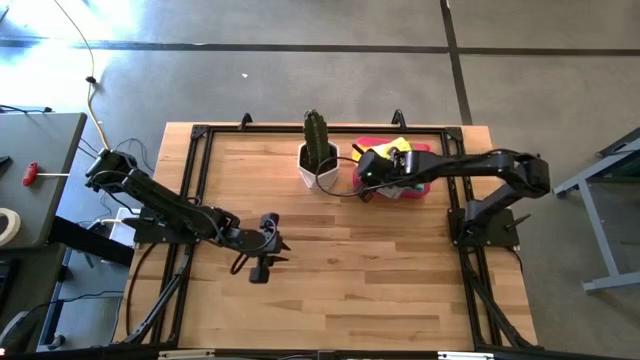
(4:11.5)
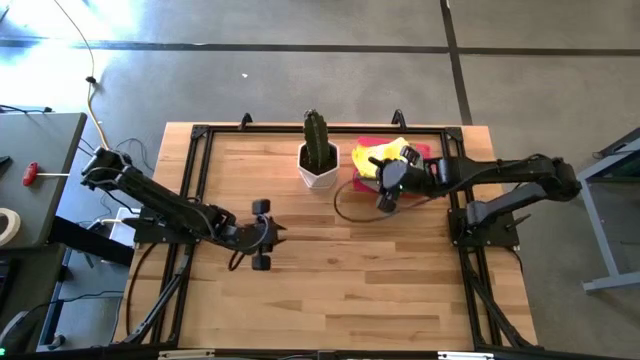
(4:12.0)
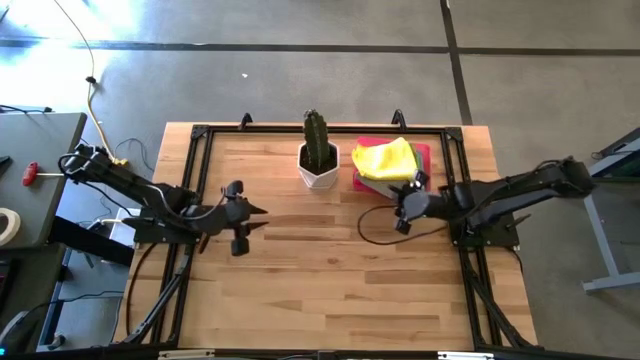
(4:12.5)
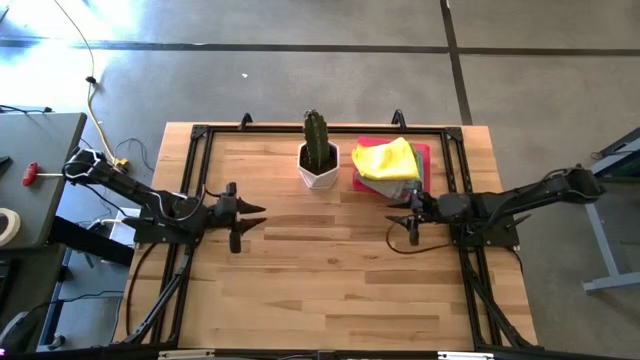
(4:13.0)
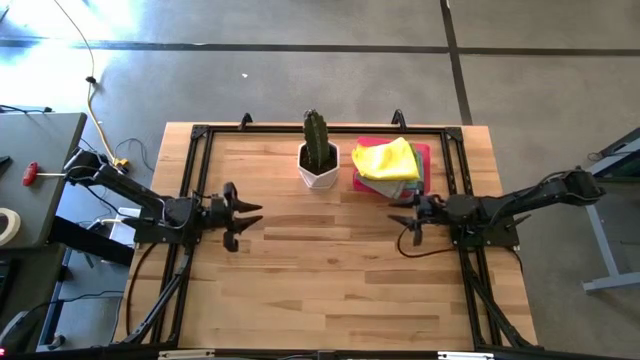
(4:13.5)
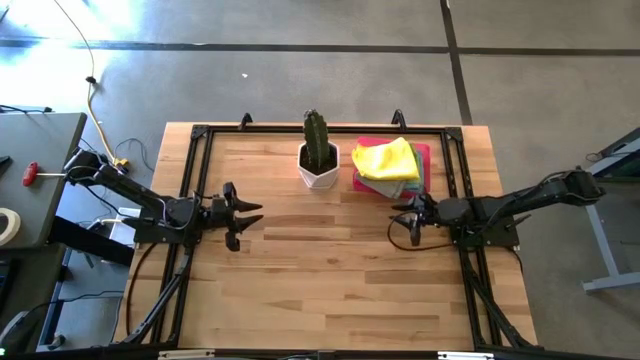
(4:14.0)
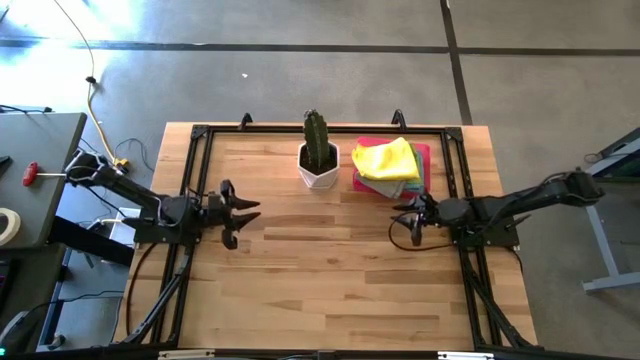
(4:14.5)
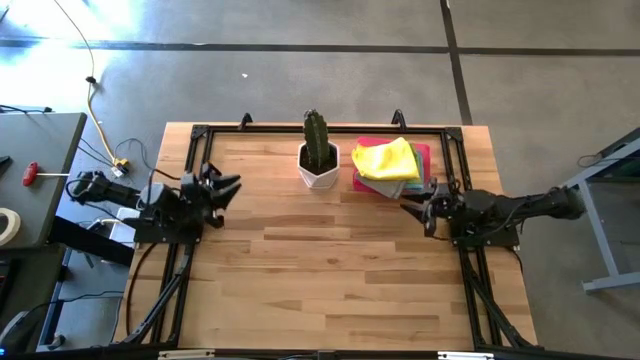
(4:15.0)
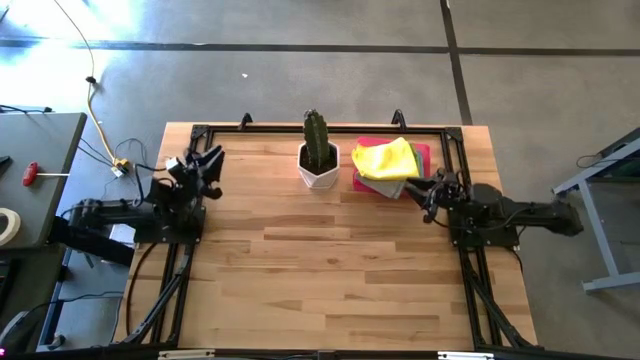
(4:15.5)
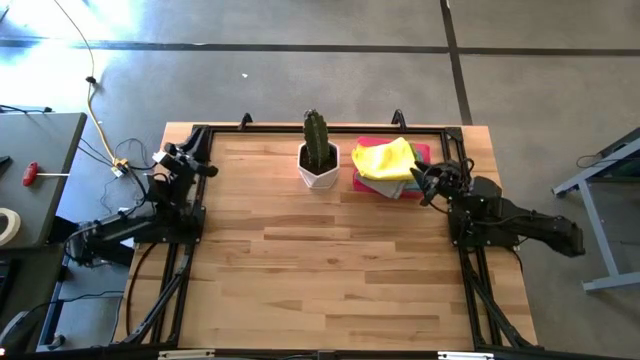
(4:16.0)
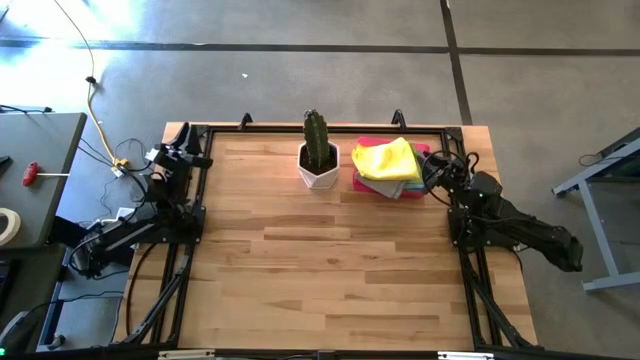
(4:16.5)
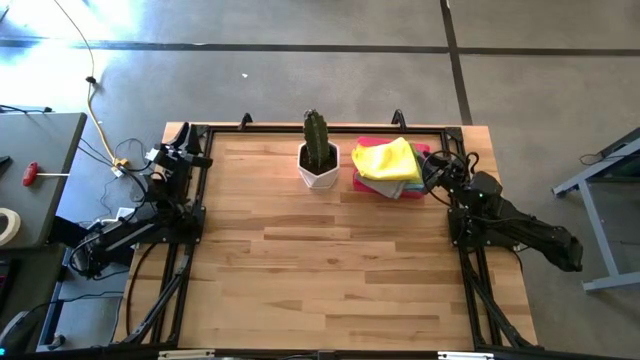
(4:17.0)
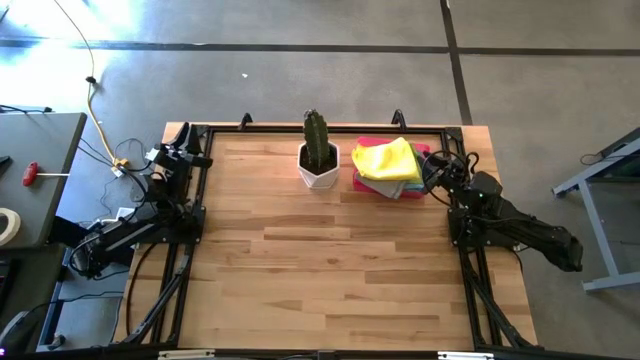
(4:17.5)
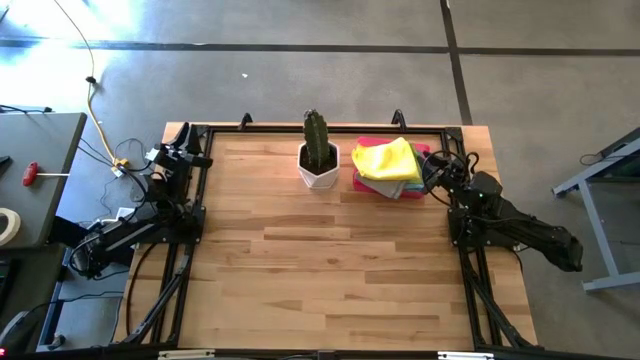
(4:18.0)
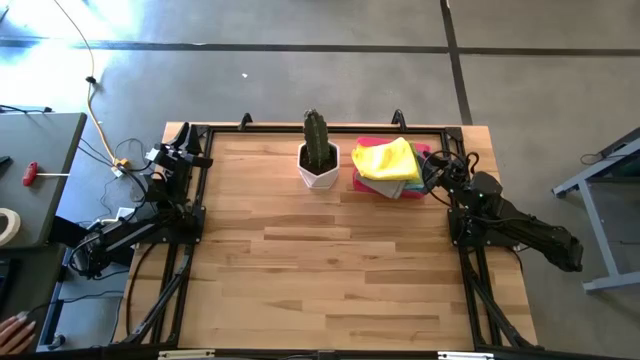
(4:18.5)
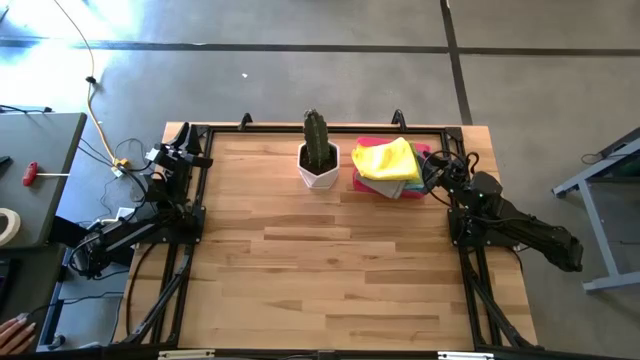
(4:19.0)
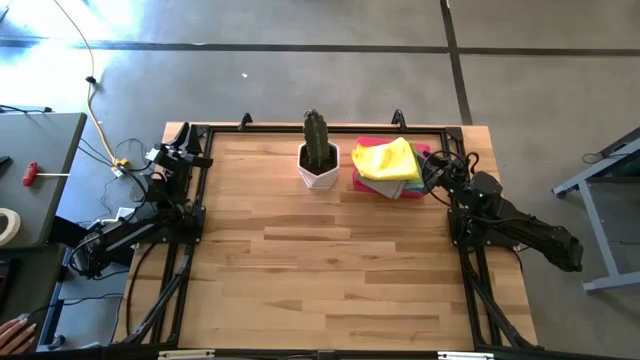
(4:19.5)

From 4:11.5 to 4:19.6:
Task: Fold microfiber towels
Return to home position

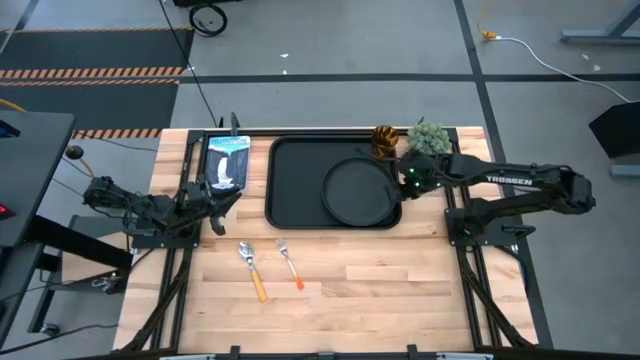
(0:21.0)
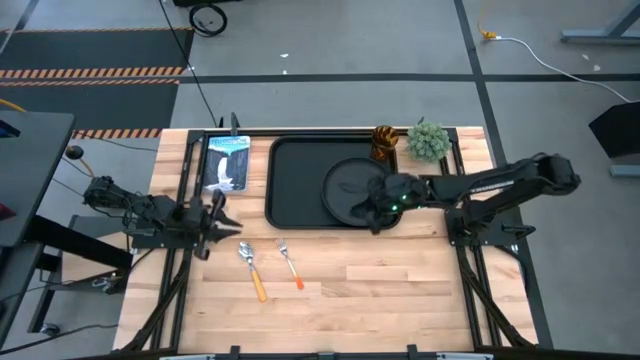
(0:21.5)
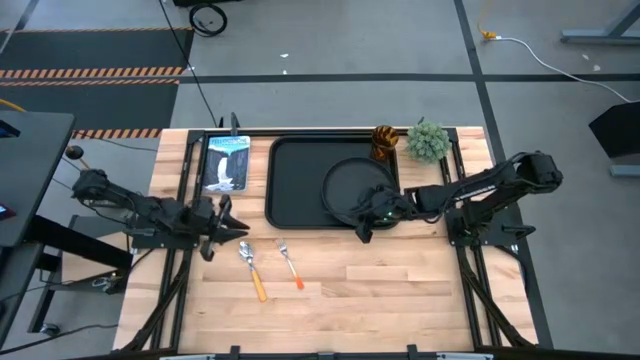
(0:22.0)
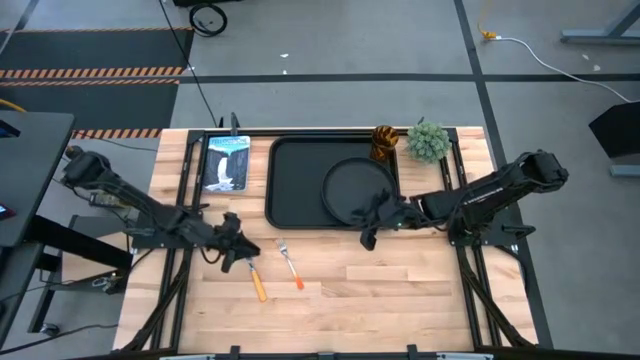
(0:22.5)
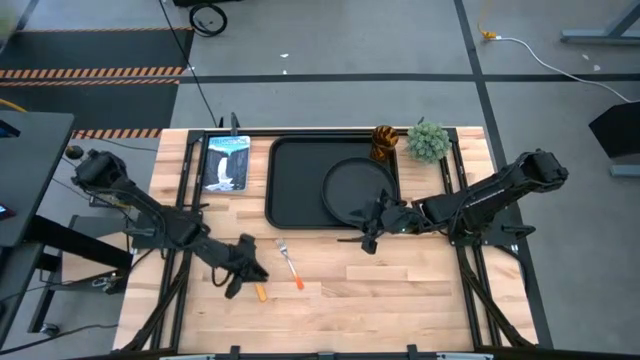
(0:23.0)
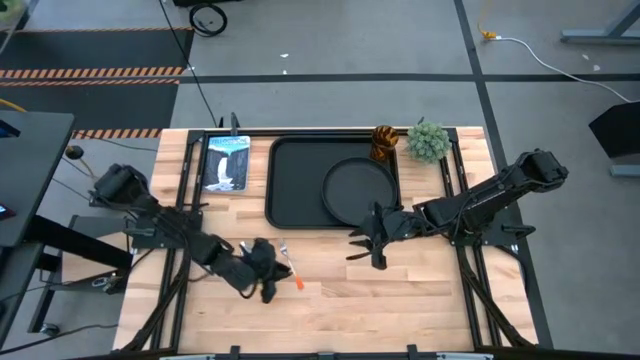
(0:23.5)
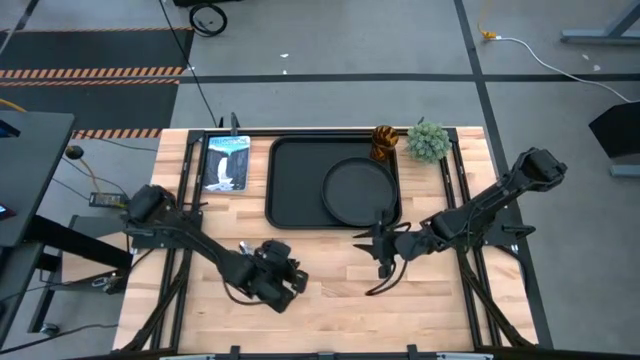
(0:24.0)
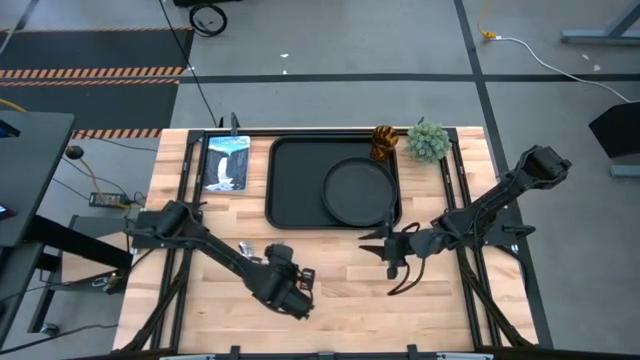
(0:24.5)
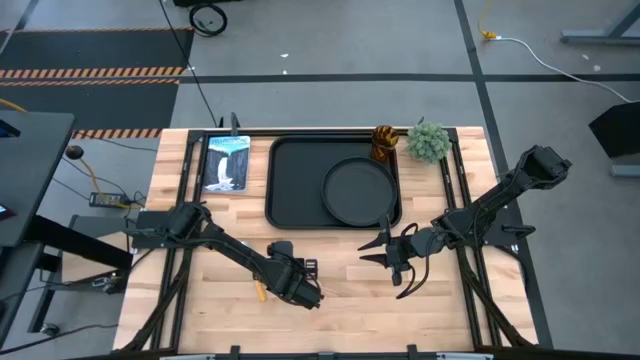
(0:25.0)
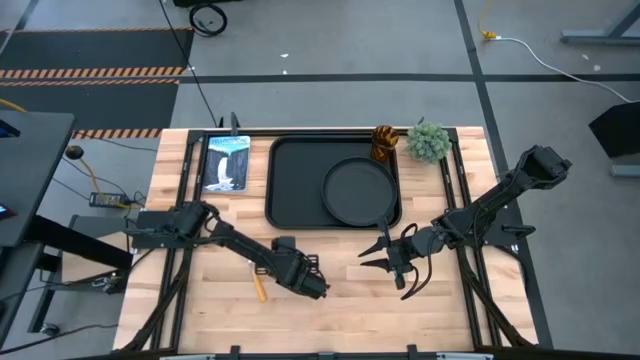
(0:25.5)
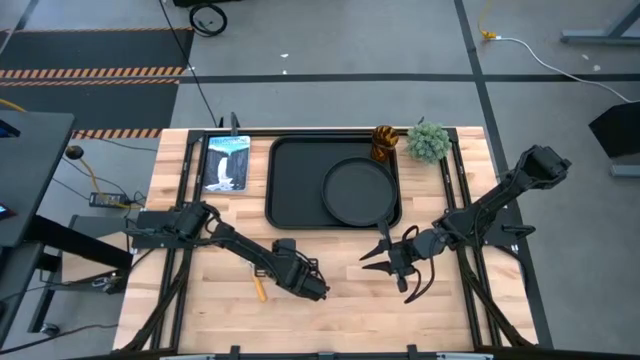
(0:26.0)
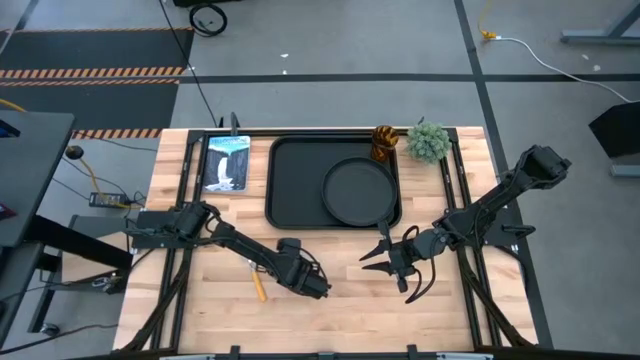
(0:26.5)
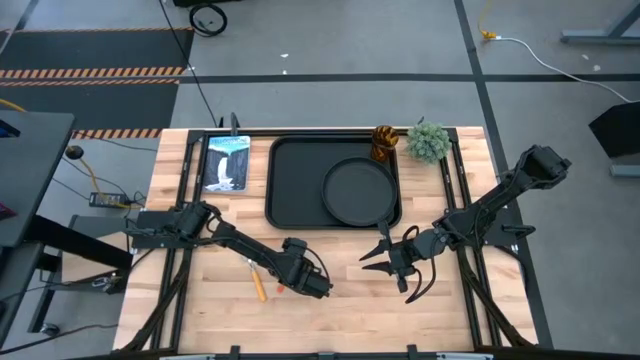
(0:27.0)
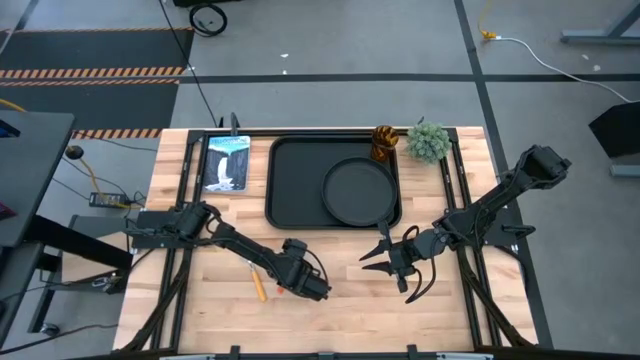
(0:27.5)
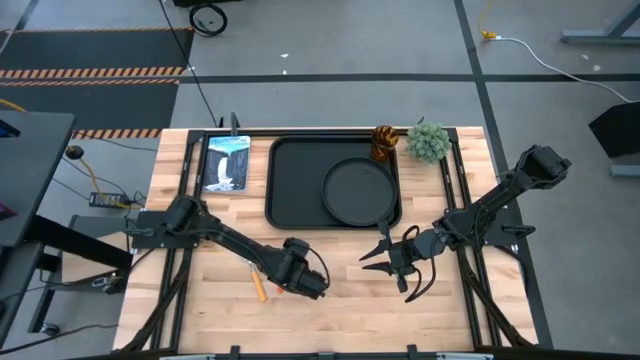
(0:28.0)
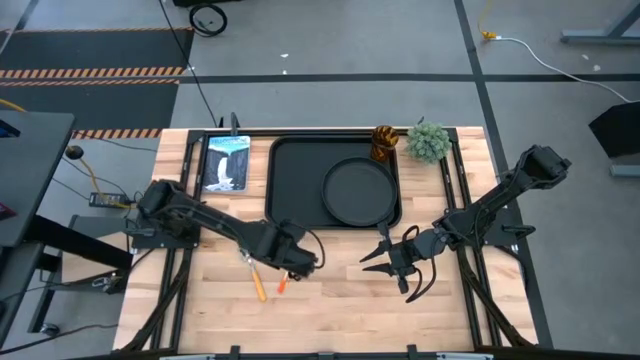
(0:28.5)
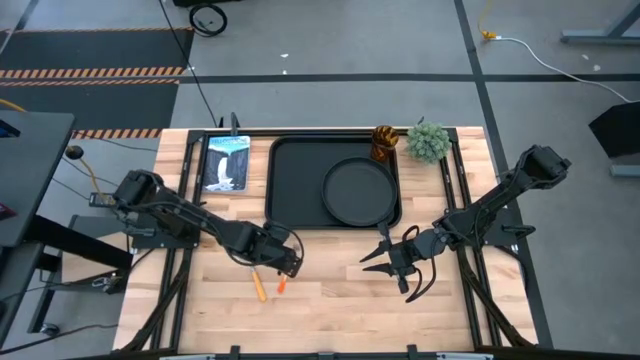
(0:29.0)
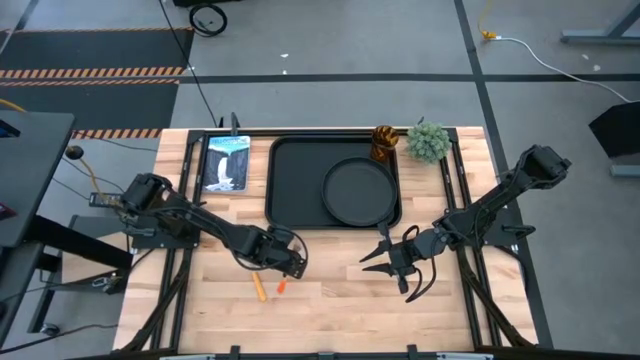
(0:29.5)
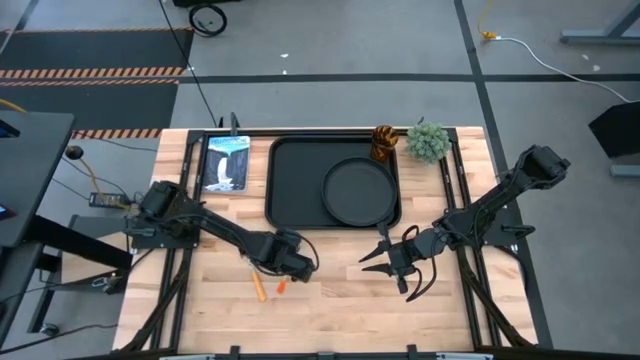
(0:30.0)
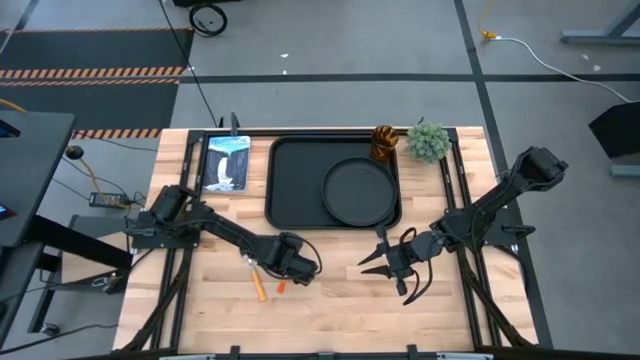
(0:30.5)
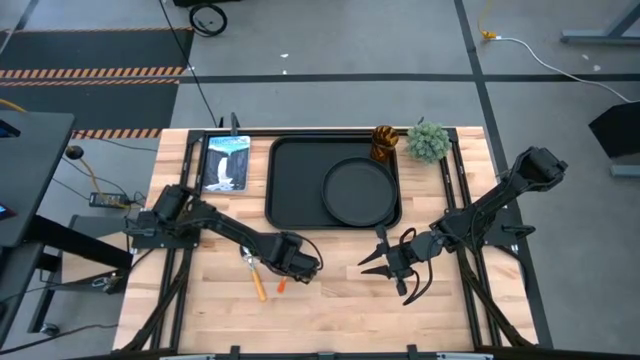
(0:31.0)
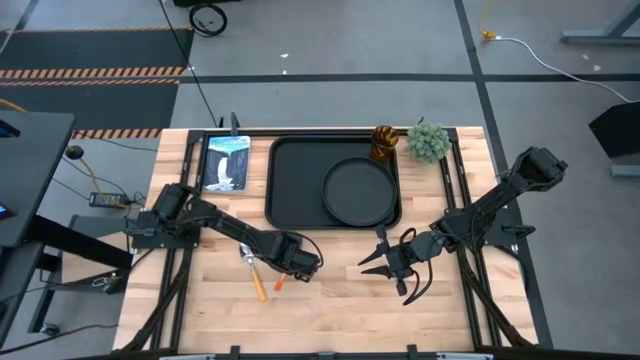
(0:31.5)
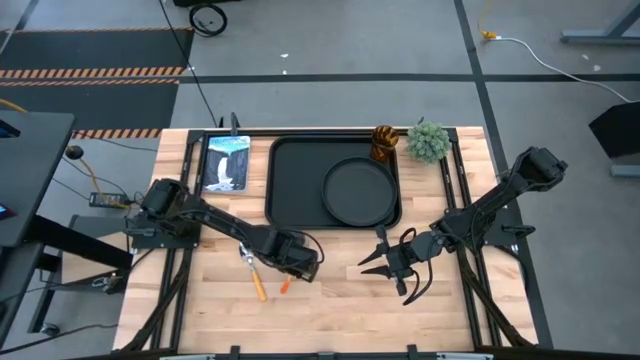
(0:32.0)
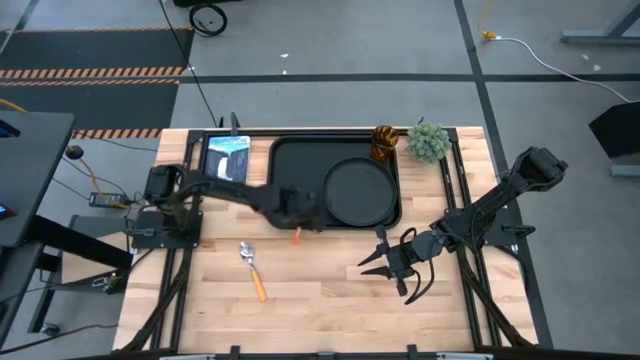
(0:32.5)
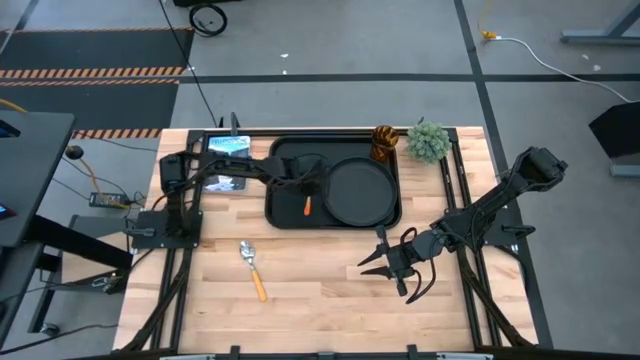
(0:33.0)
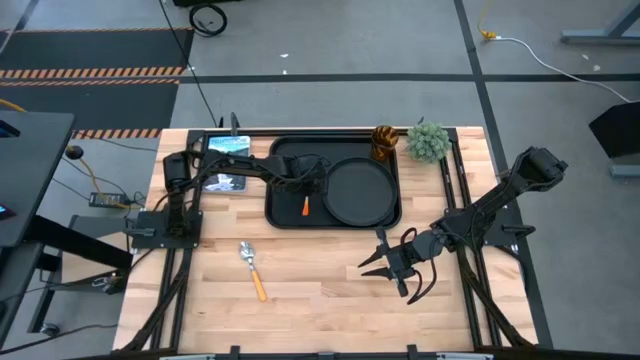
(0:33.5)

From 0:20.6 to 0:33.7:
Task: Pick and place plate/cup/fork/spoon on tray
Put the orange fork on the black serving tray to the left of the black plate
